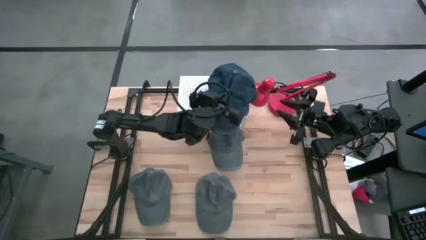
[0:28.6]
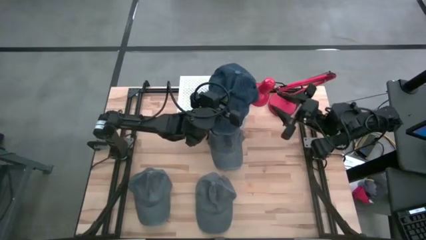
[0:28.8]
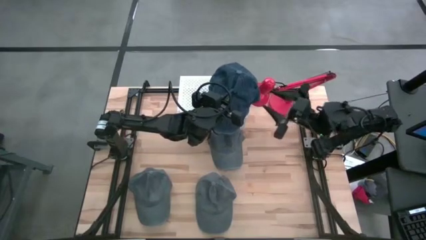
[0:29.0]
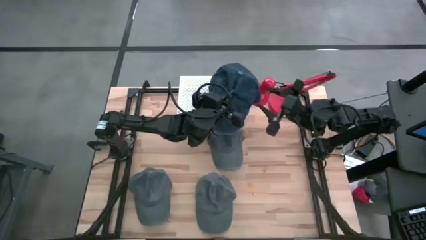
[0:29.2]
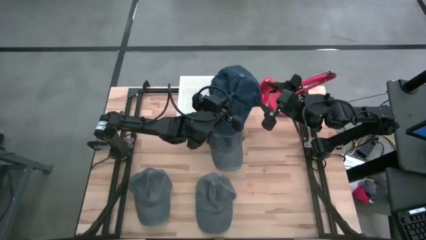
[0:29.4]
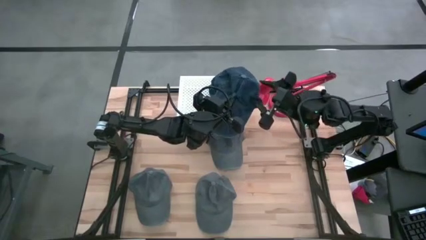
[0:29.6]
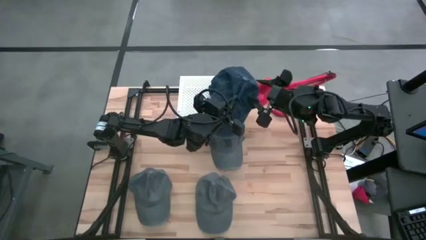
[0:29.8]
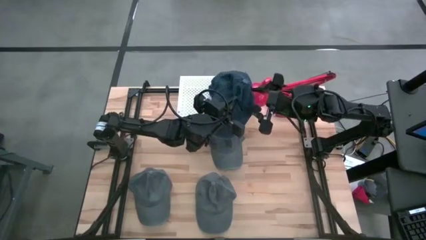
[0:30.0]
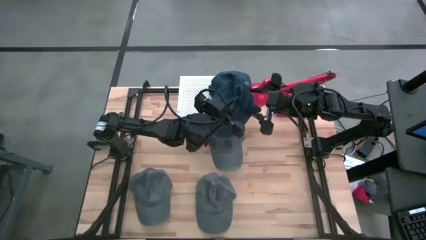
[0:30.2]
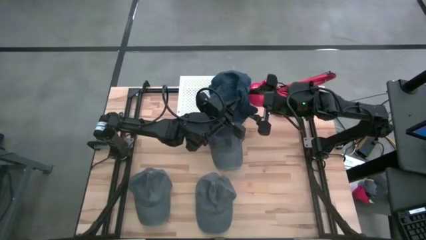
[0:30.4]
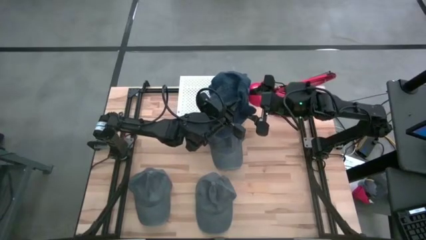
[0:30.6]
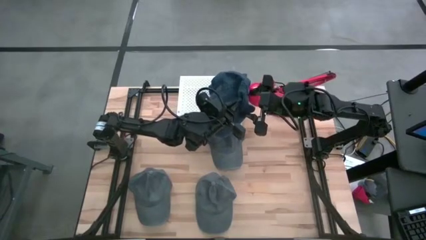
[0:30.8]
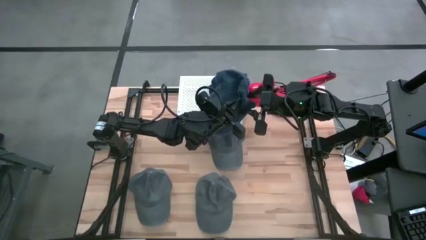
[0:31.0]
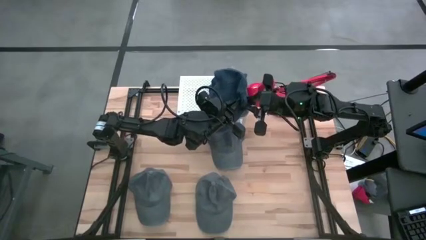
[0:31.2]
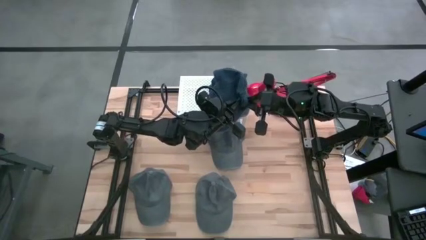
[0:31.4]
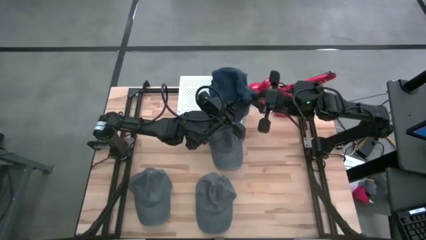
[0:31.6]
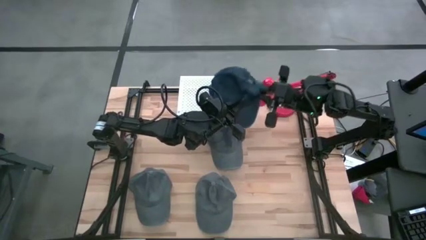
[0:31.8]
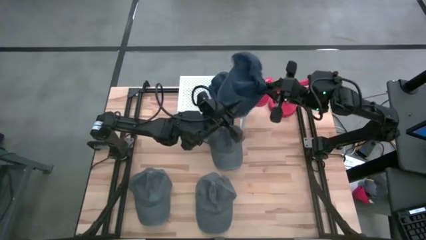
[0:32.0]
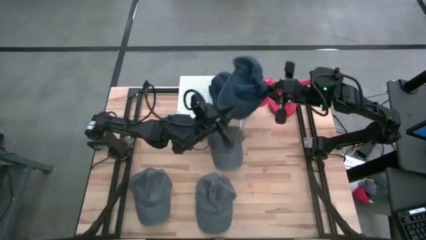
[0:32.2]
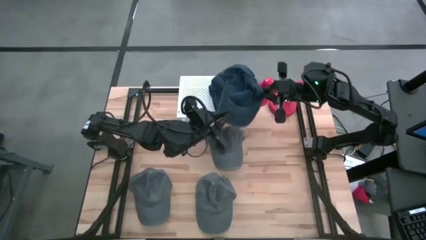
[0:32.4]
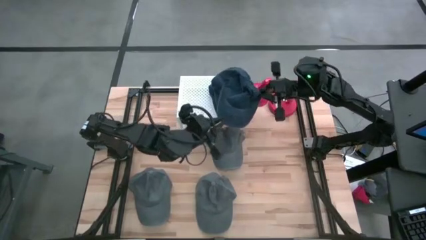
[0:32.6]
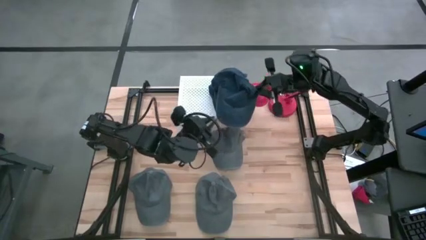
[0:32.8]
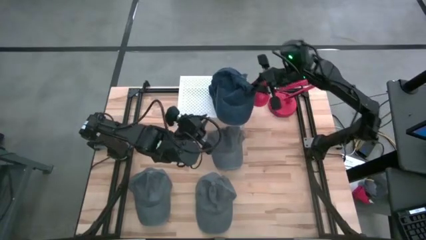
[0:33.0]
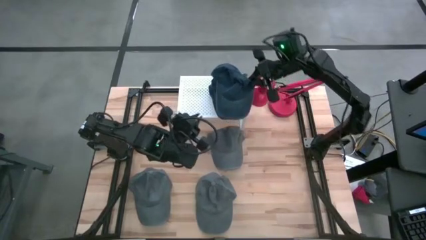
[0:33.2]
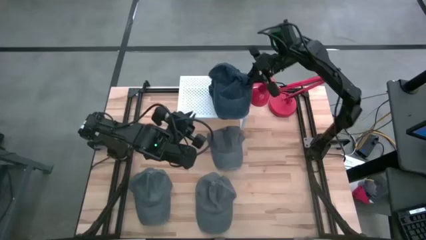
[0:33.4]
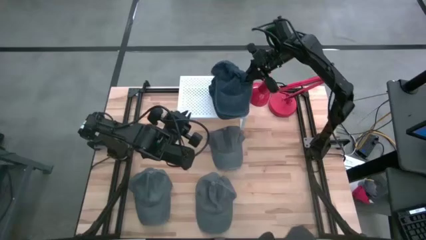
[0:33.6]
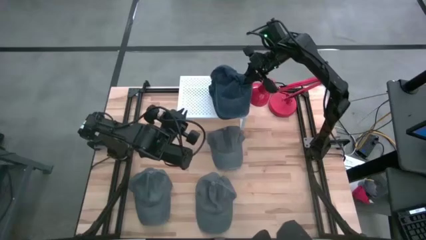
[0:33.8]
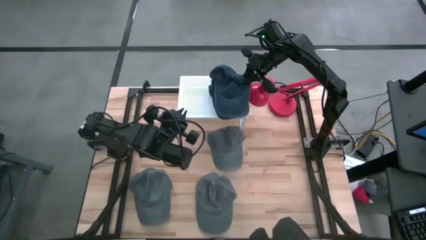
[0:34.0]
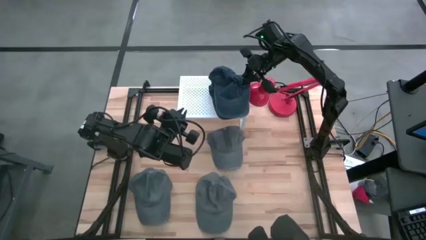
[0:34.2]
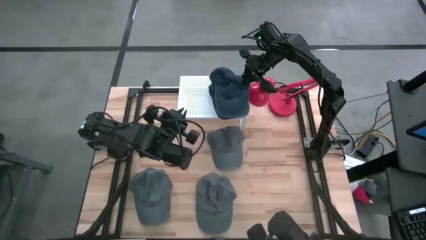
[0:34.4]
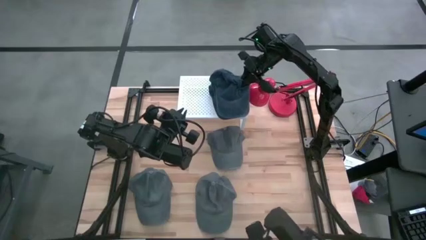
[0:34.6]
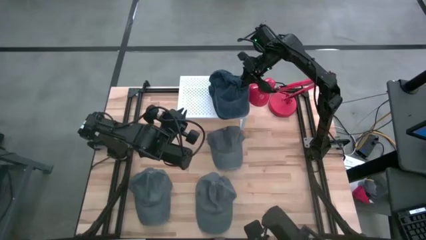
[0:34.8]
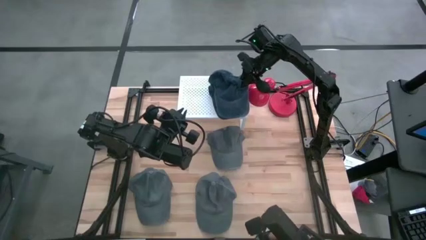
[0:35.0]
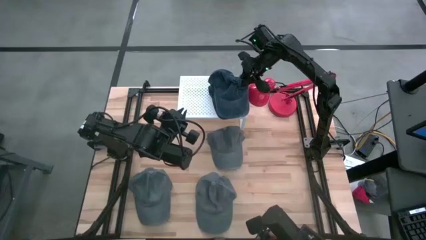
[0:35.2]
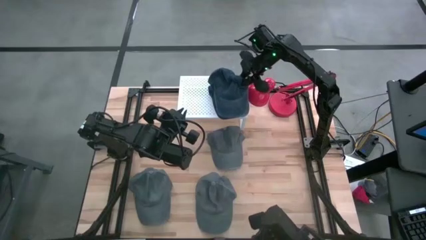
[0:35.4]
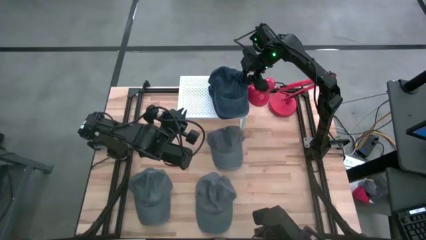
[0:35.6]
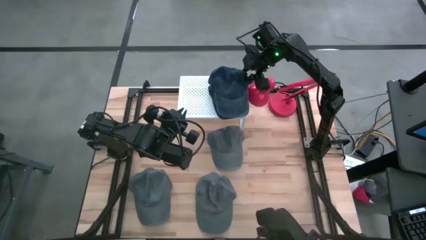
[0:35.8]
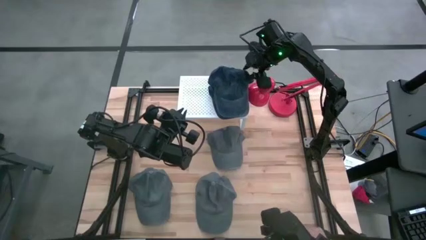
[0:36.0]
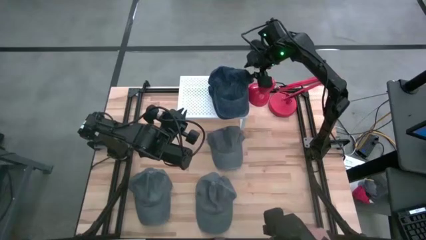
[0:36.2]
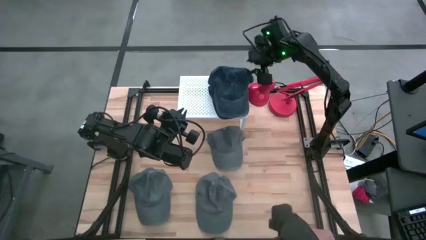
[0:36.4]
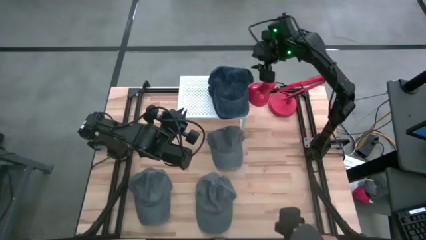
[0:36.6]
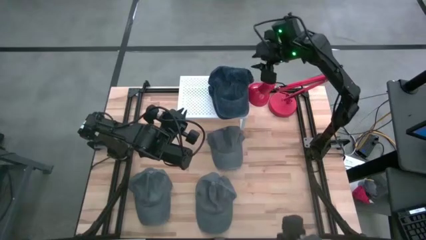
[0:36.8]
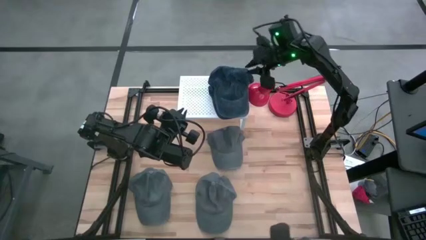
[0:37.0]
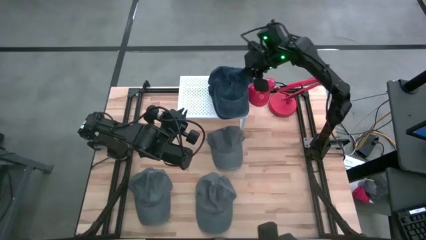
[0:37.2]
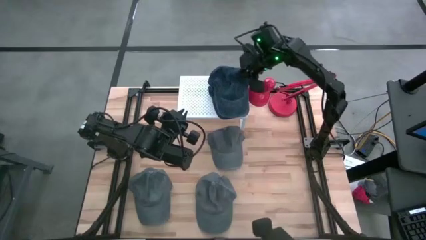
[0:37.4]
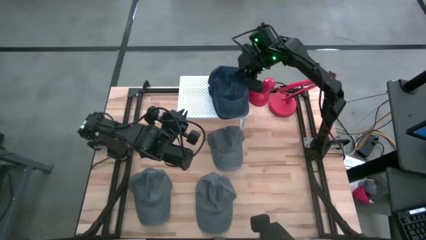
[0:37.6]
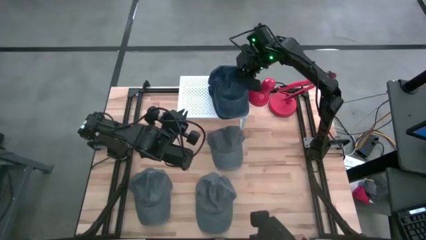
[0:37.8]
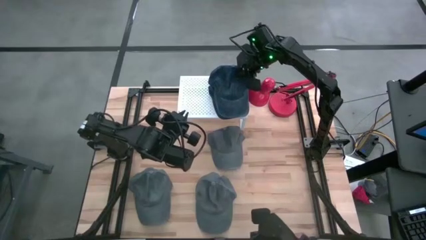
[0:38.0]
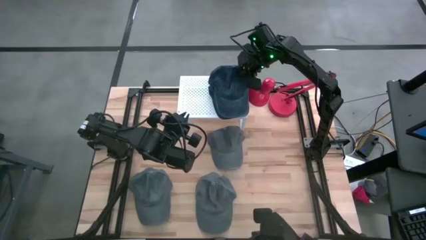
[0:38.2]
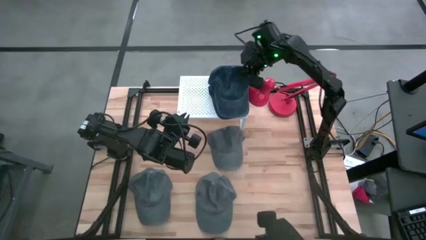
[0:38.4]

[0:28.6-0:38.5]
Task: Pick & Place hat
Stack the gray cap on the top of the other gray cap on the shelf
